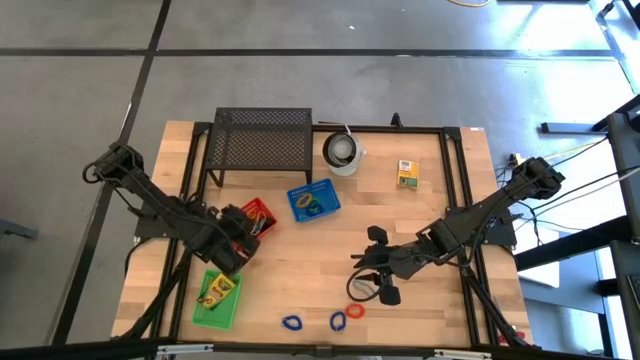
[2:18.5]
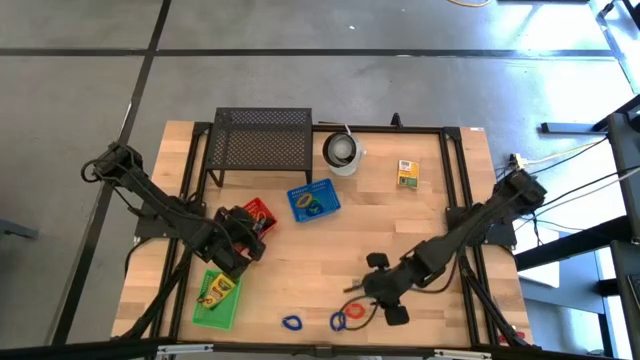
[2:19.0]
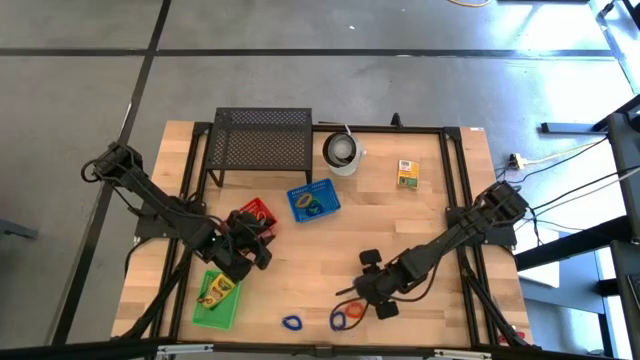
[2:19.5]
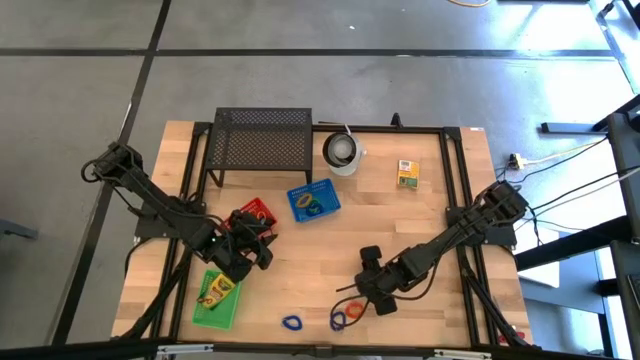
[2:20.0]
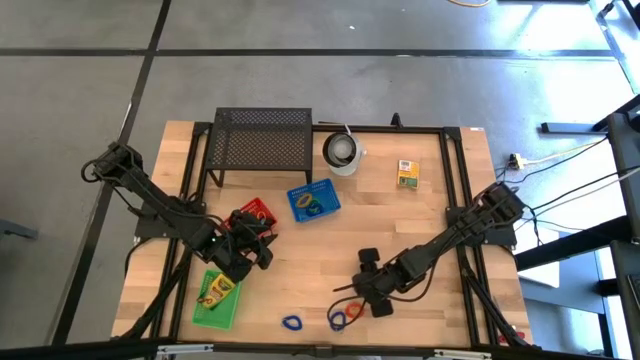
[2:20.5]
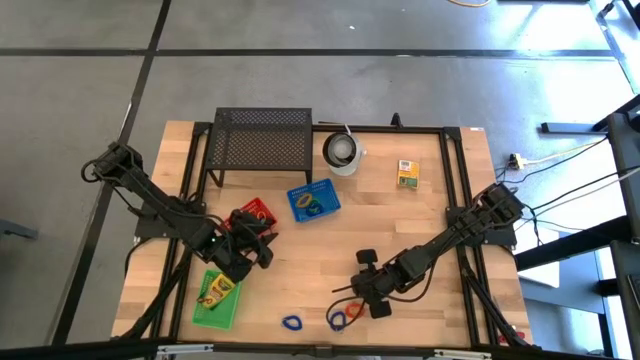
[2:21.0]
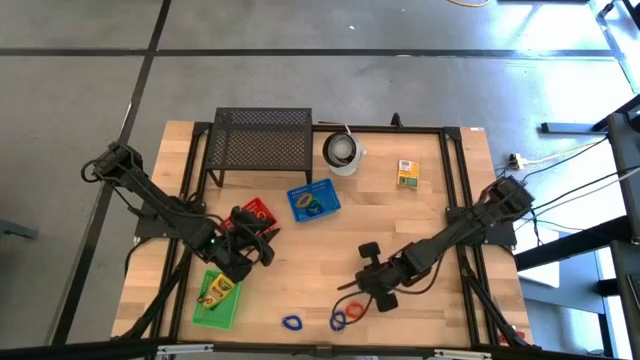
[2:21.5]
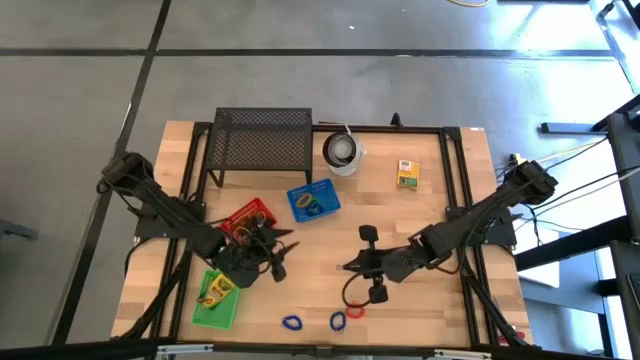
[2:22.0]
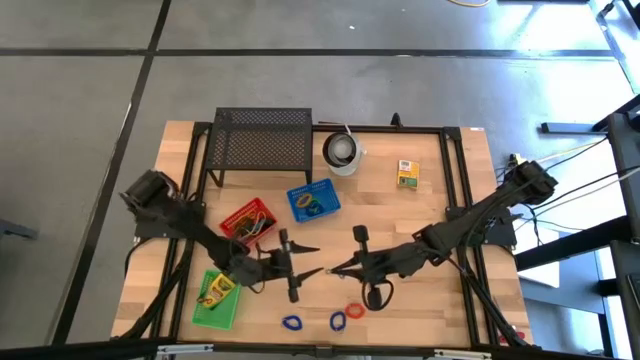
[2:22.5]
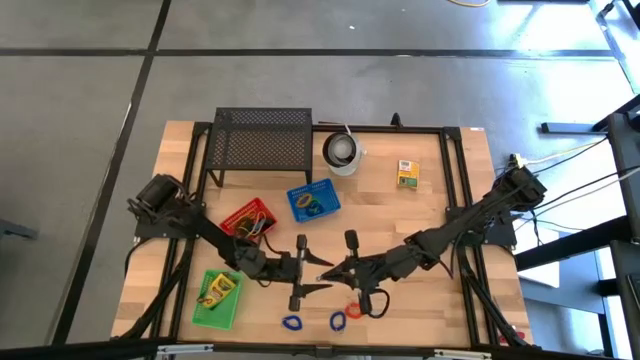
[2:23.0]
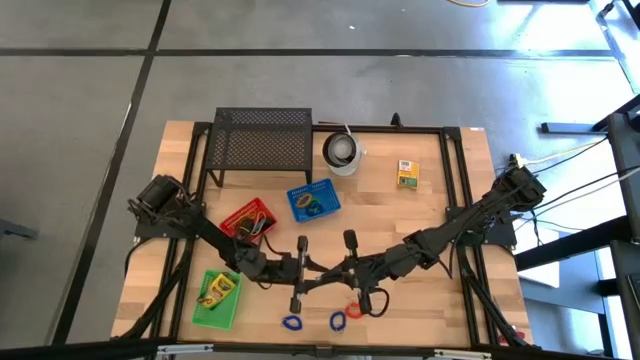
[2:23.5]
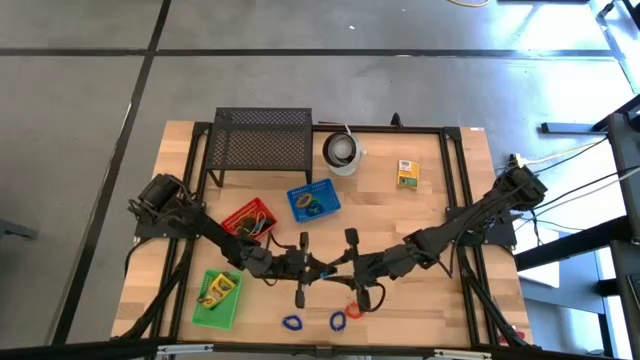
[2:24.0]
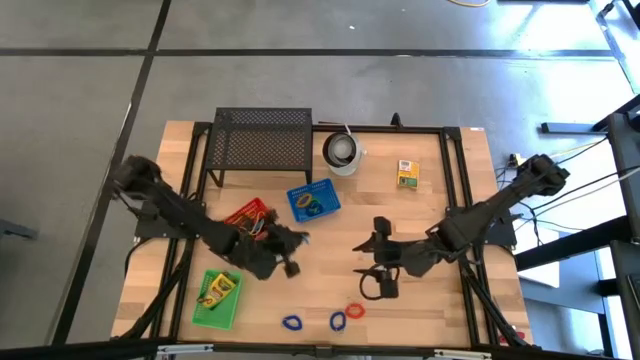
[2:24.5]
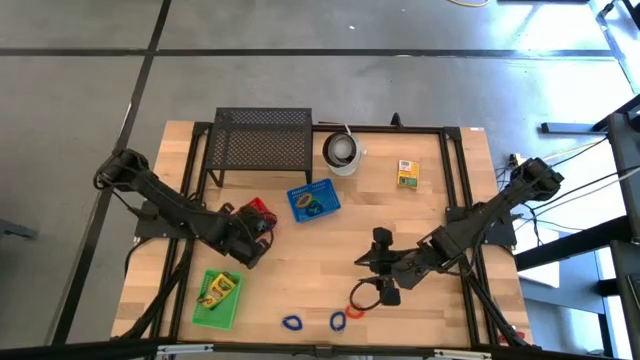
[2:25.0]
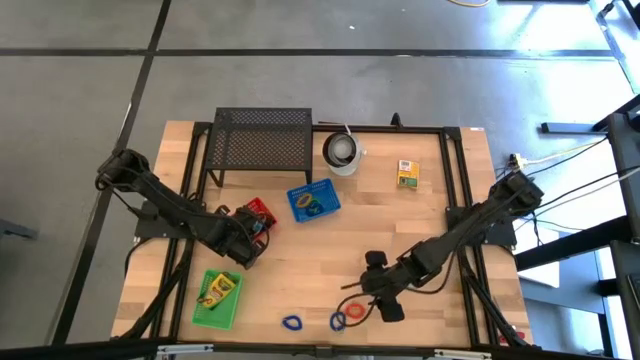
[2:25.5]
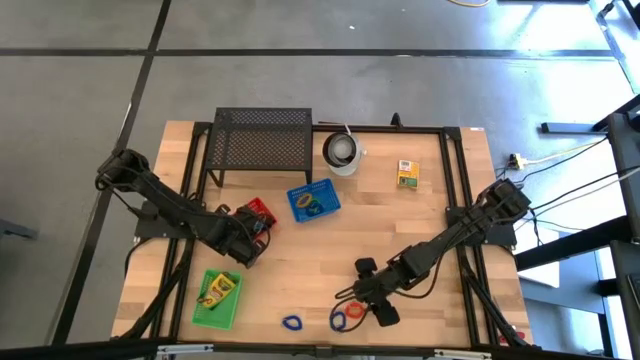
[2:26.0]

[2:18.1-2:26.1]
Task: Pick & Place Office Desk Supplies
Put the blue rubber band into the red bin

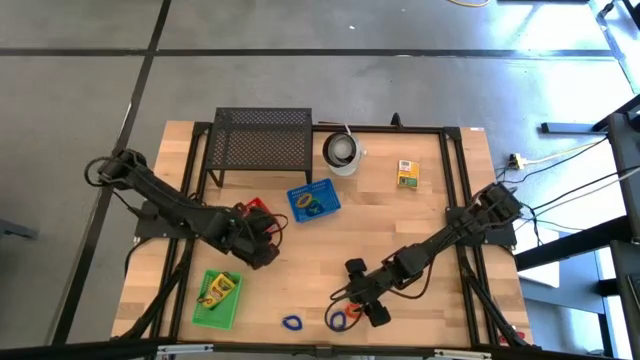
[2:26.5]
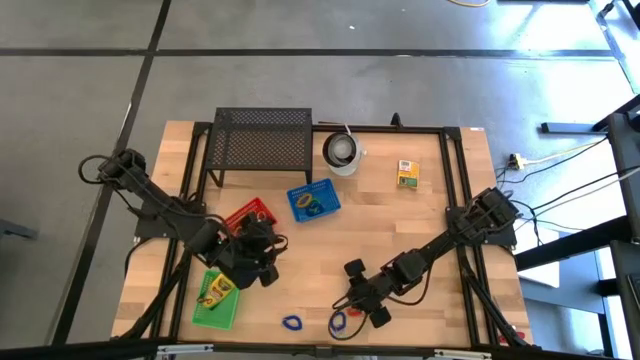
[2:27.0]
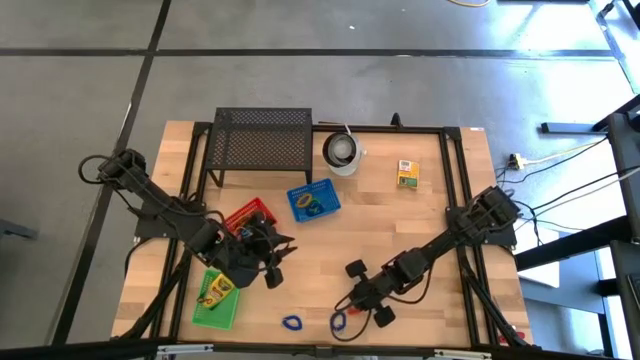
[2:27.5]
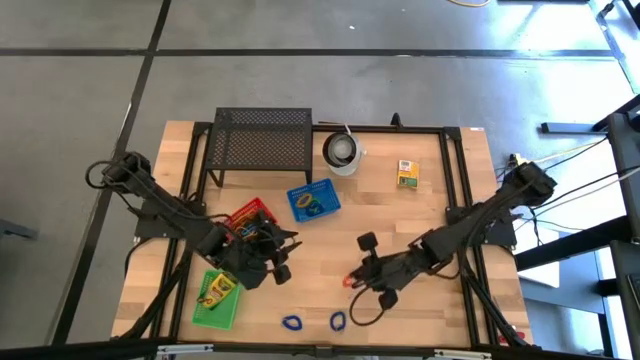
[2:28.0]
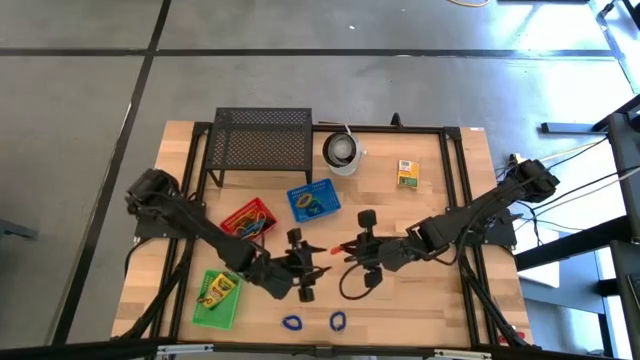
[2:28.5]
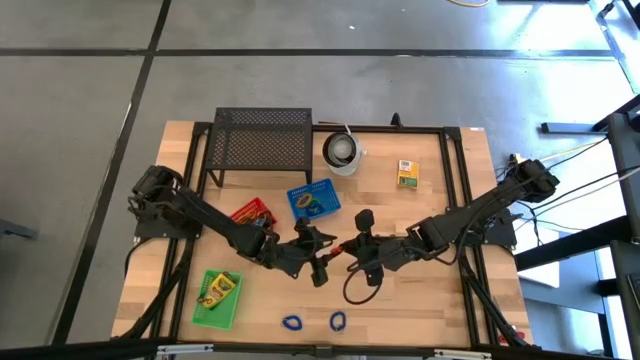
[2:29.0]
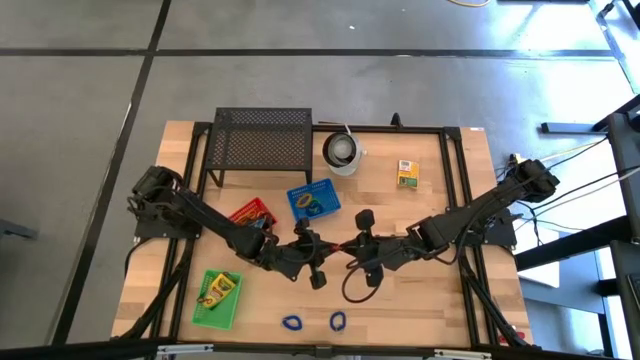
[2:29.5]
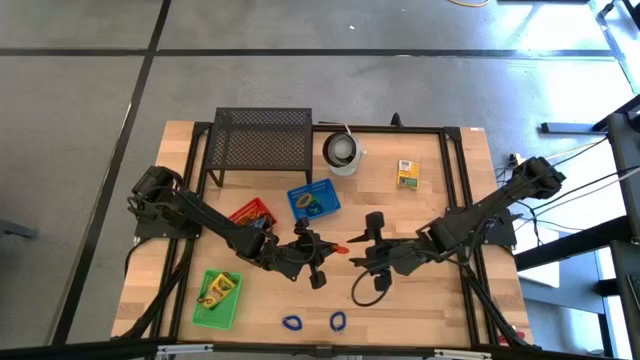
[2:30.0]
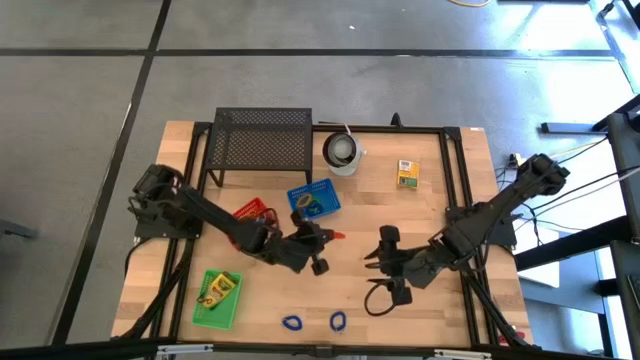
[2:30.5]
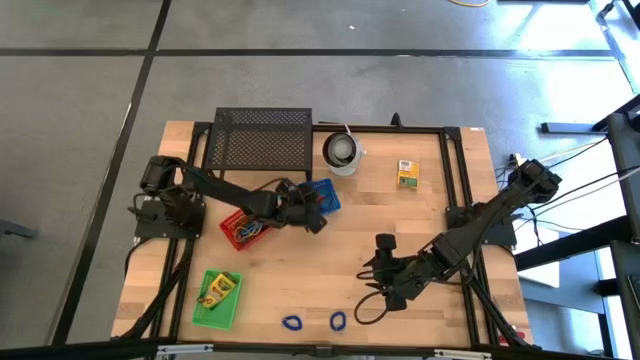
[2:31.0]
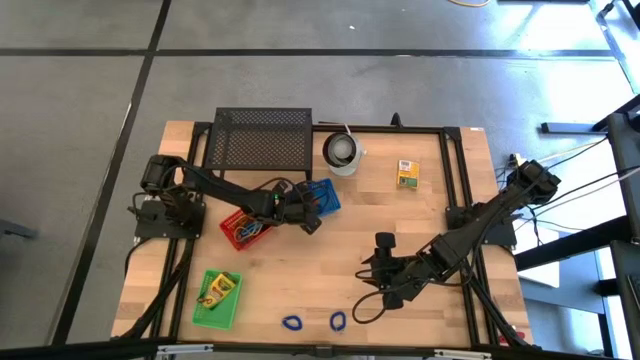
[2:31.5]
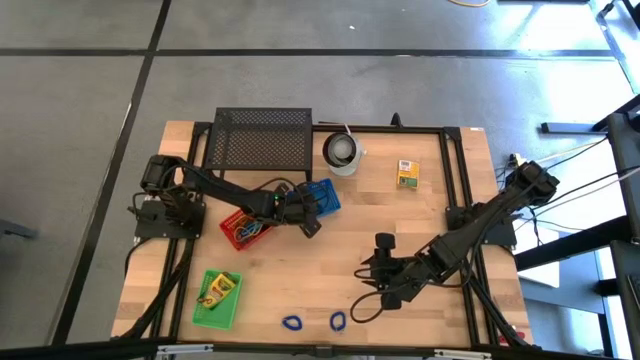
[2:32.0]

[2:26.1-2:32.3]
Put the orange spring keychain into the blue bin

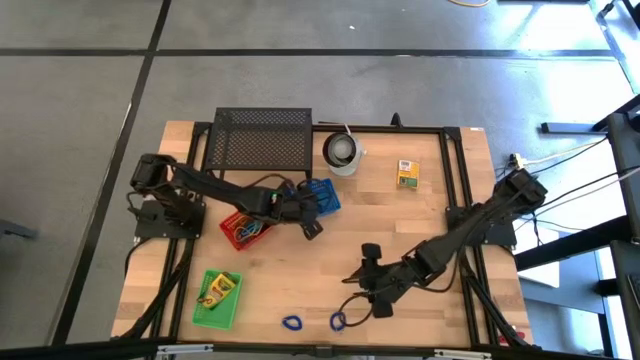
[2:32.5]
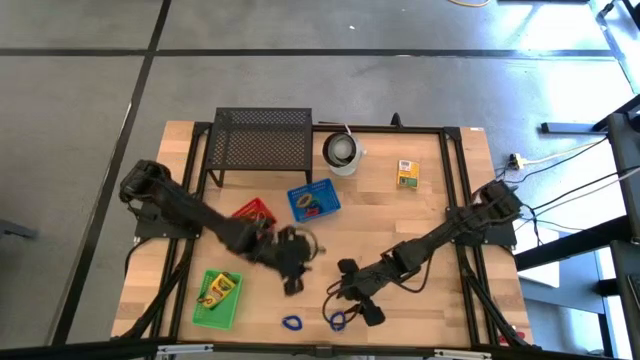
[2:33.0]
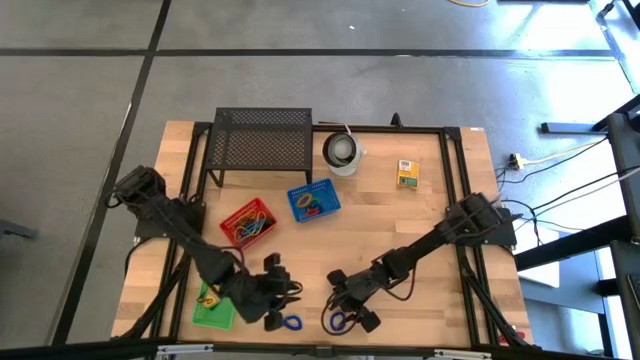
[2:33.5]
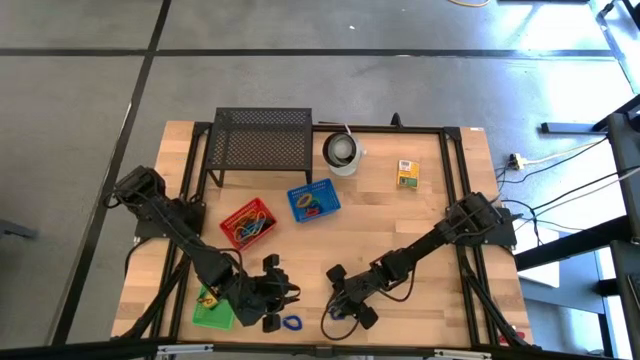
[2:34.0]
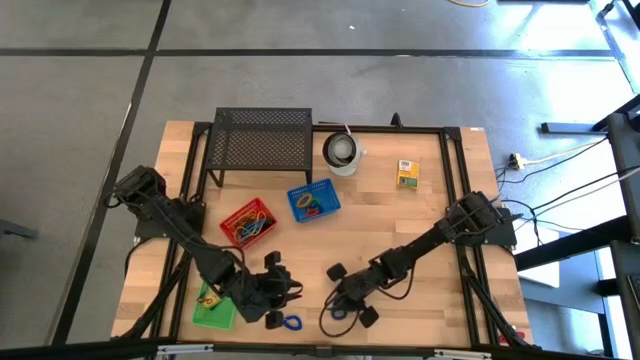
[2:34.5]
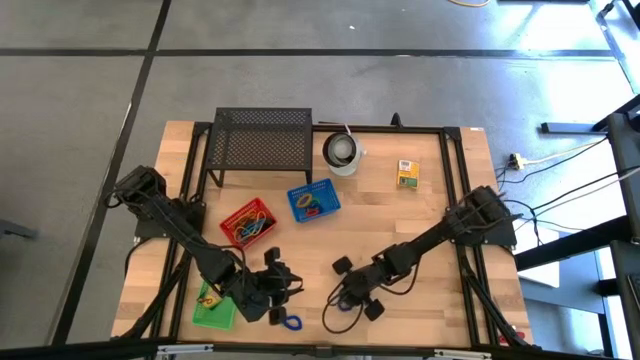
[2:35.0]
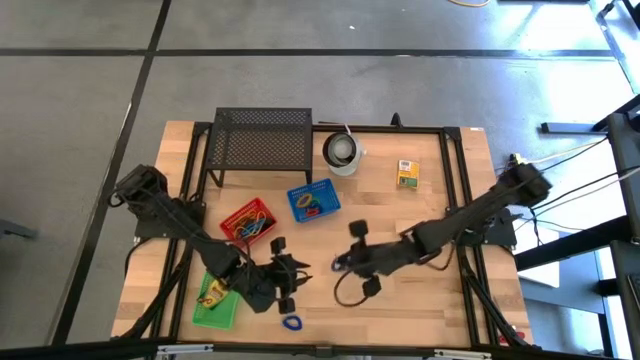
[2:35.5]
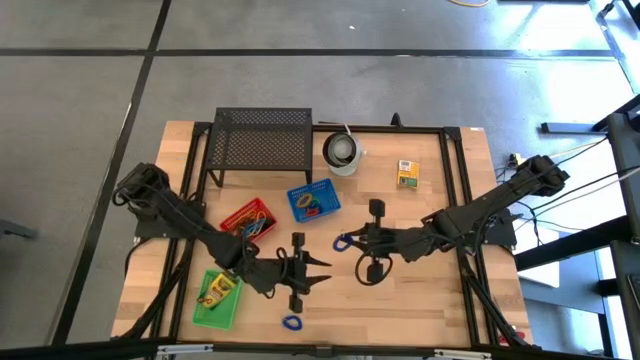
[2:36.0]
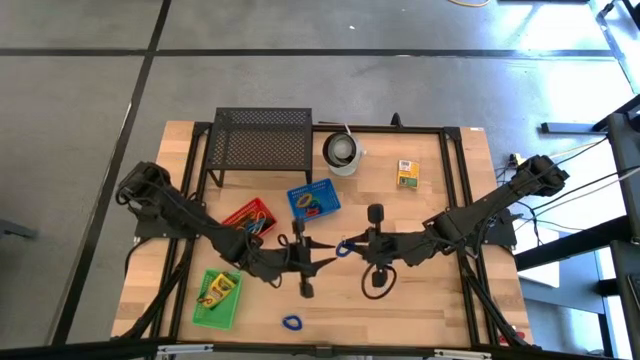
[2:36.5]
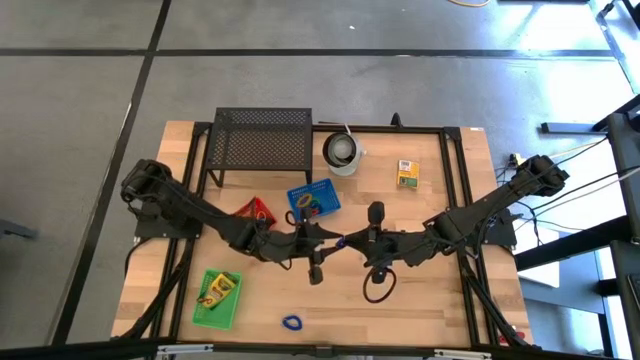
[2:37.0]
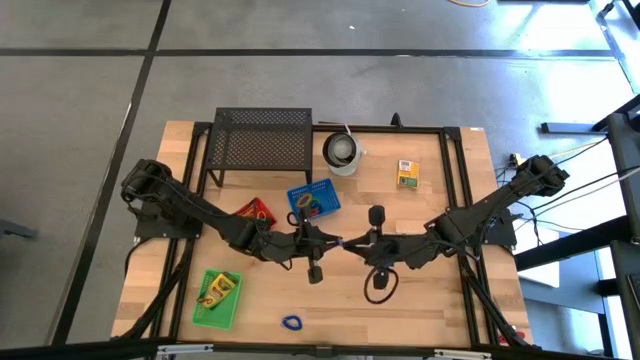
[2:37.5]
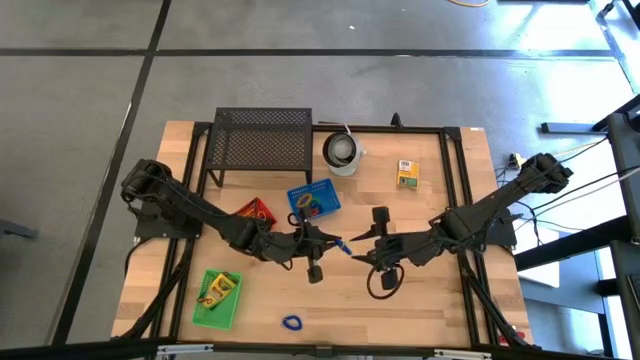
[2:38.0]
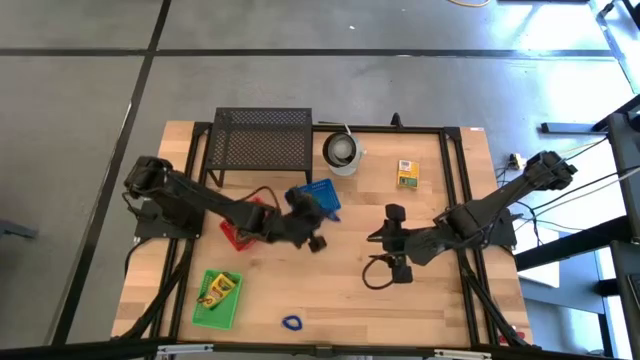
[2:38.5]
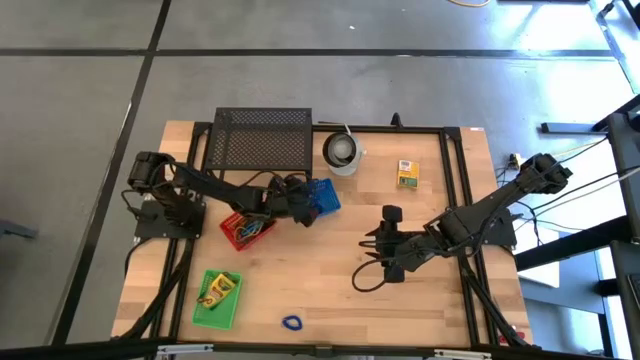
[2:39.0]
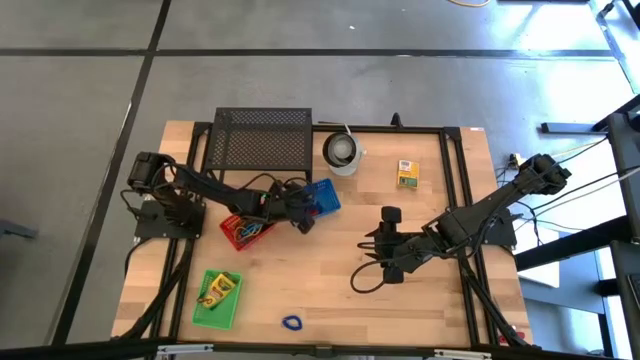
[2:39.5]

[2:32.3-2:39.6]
Put the blue spring keychain into the blue bin

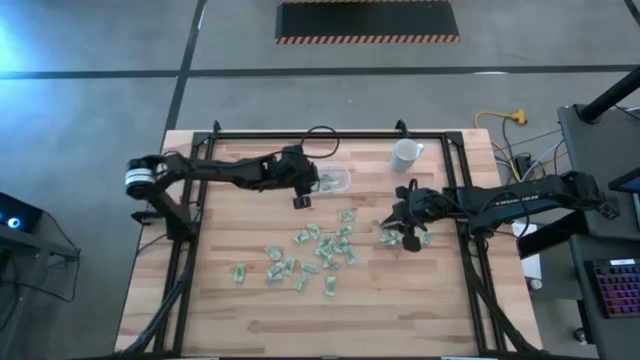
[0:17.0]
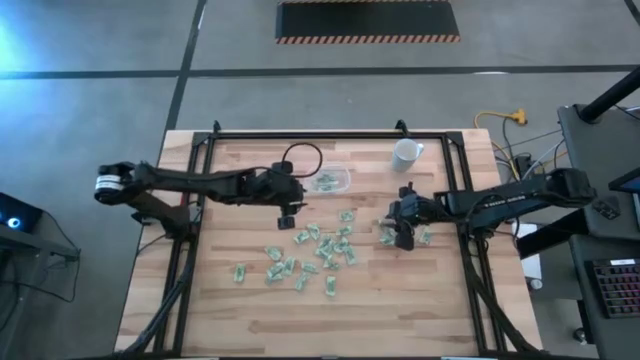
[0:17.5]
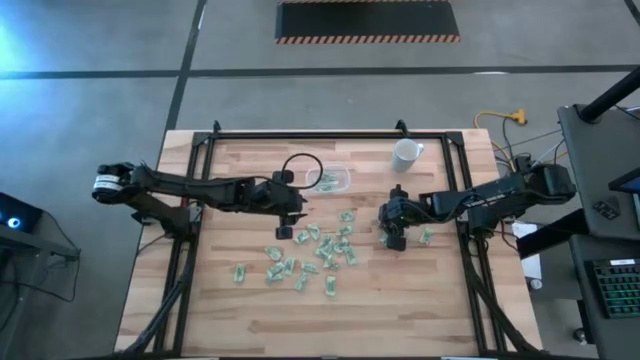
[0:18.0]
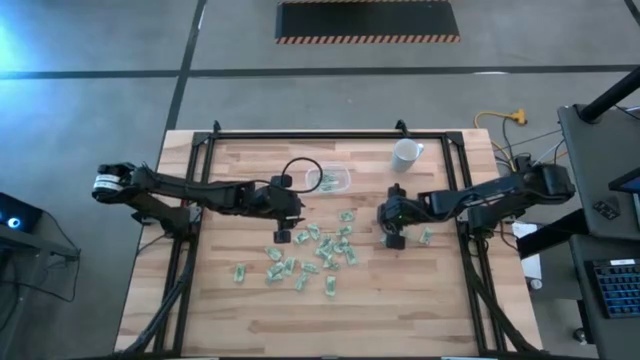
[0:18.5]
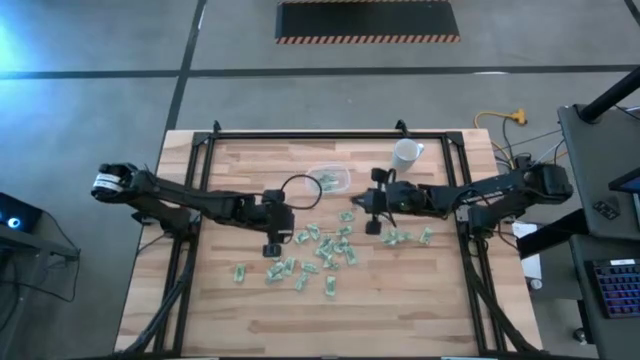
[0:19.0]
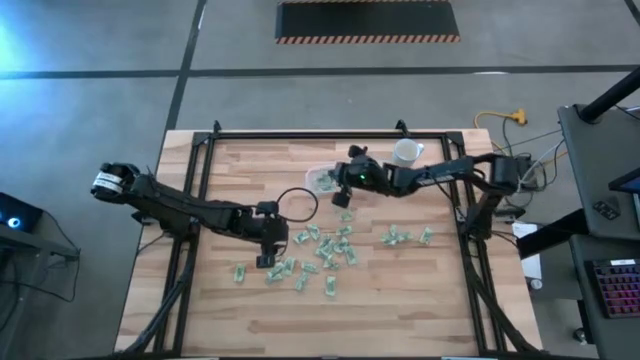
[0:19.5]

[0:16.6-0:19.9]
Task: Pick and place Stevia / Truvia into bins
Put the stevia packet into the transparent container
